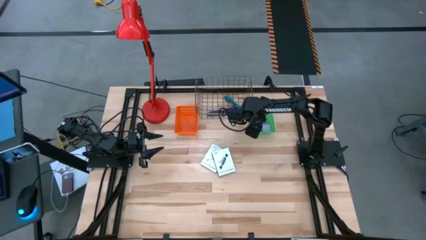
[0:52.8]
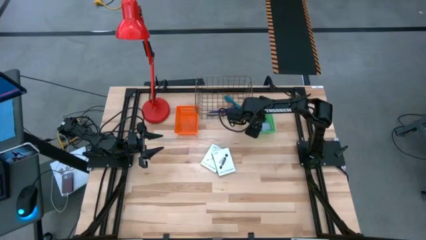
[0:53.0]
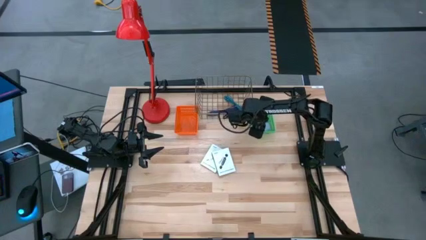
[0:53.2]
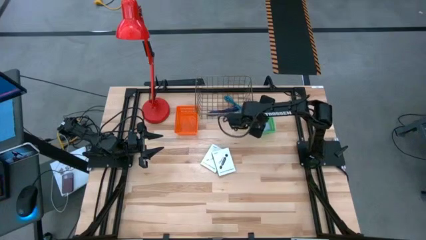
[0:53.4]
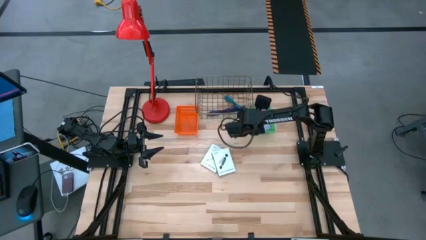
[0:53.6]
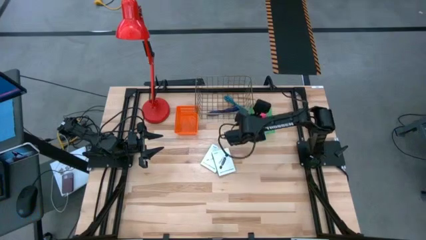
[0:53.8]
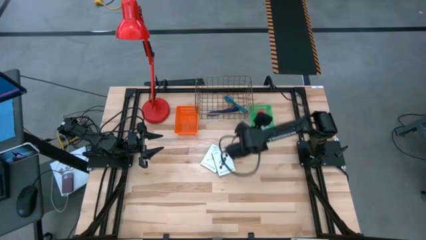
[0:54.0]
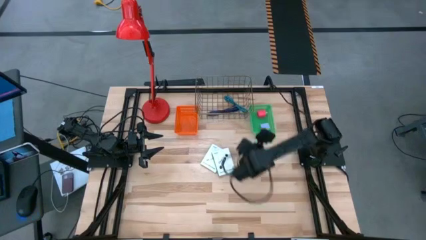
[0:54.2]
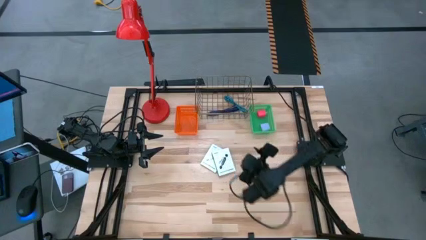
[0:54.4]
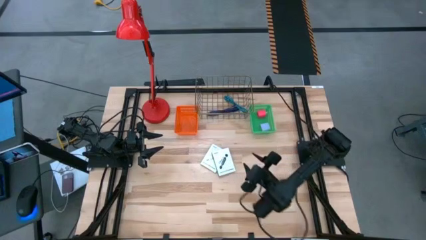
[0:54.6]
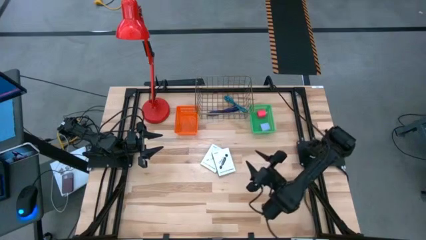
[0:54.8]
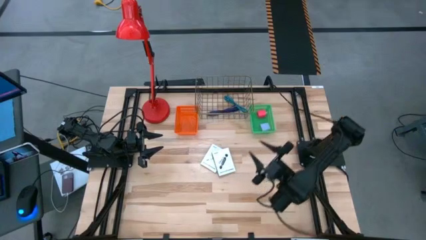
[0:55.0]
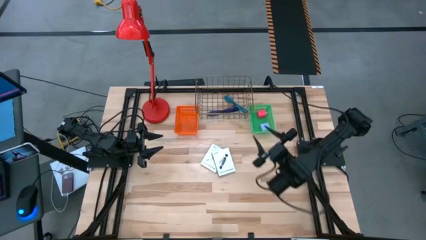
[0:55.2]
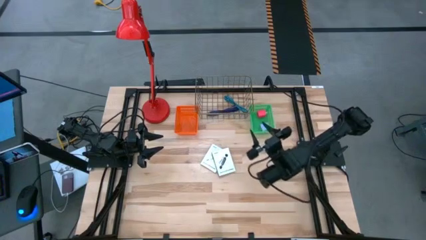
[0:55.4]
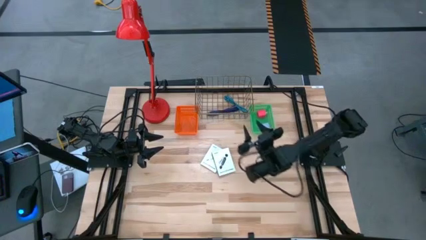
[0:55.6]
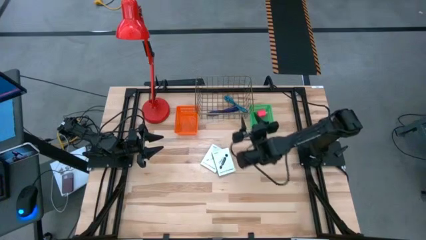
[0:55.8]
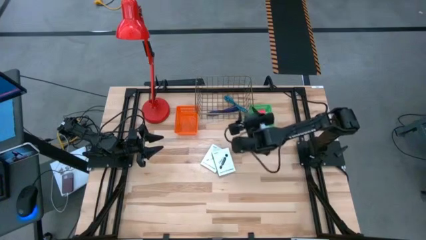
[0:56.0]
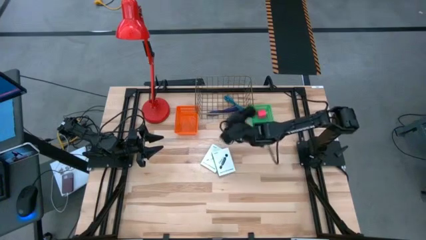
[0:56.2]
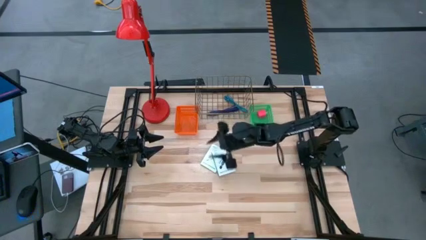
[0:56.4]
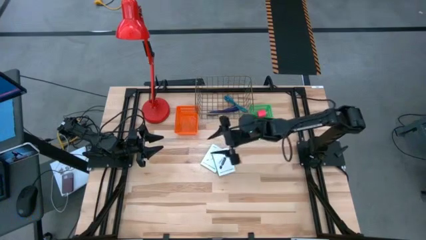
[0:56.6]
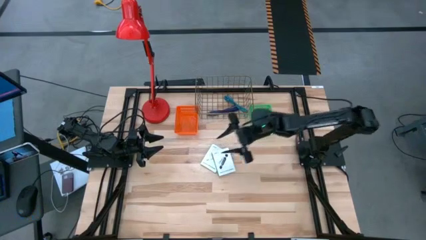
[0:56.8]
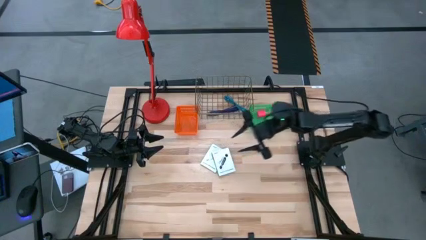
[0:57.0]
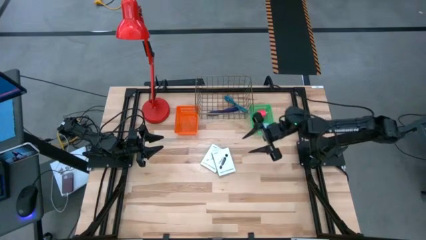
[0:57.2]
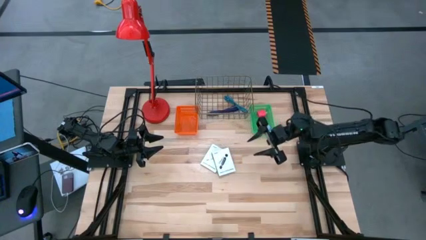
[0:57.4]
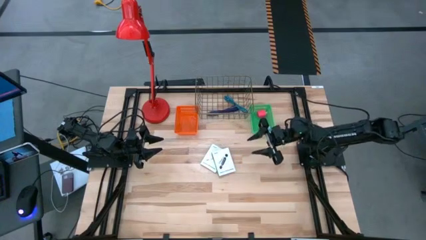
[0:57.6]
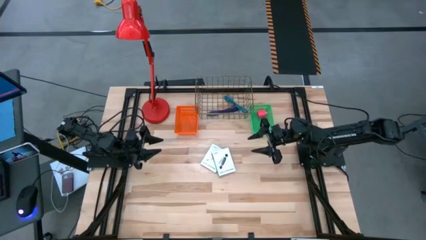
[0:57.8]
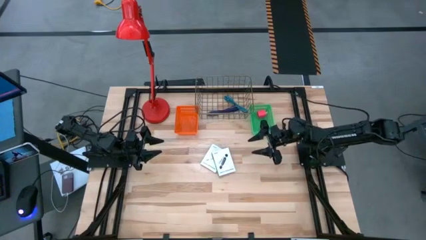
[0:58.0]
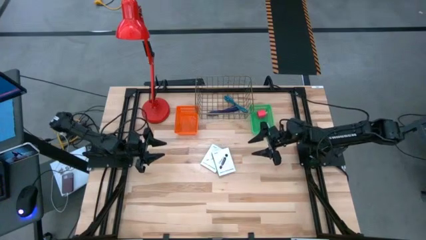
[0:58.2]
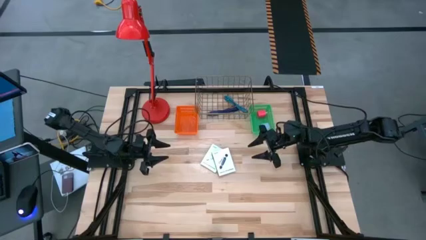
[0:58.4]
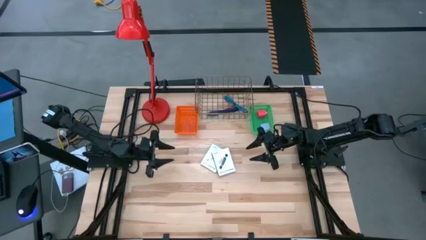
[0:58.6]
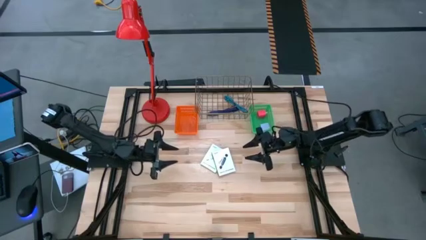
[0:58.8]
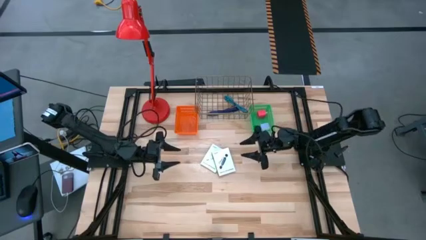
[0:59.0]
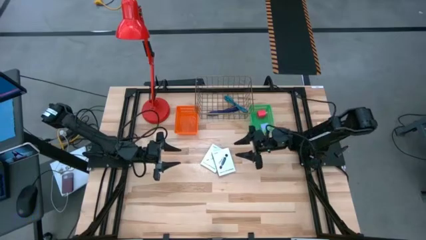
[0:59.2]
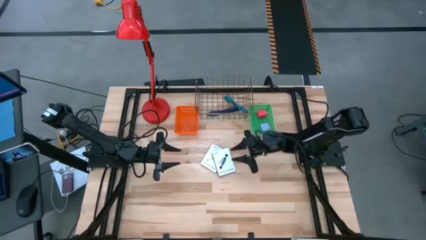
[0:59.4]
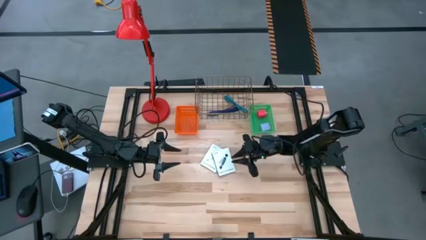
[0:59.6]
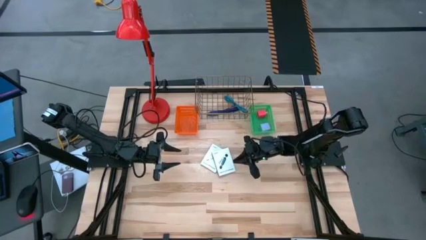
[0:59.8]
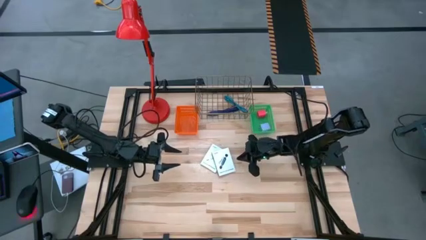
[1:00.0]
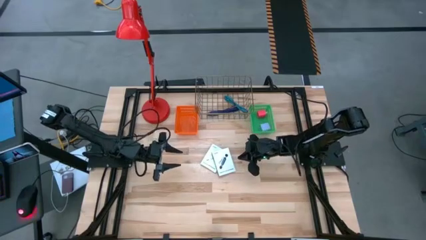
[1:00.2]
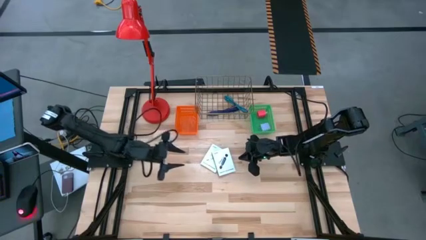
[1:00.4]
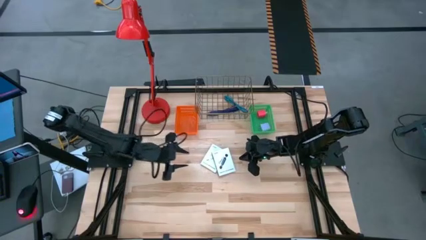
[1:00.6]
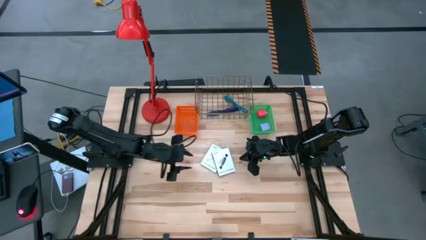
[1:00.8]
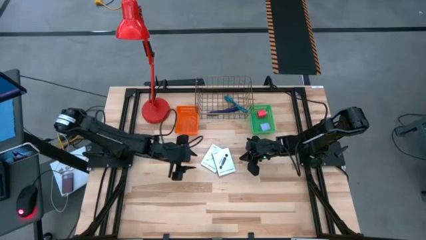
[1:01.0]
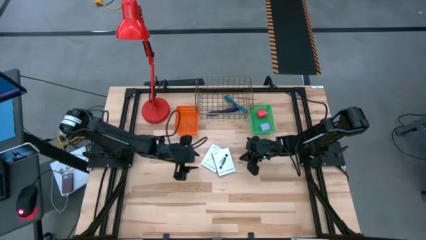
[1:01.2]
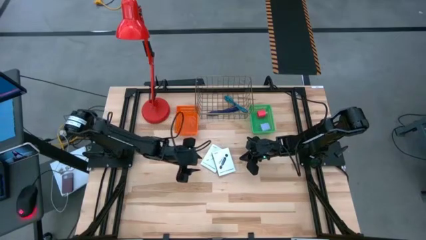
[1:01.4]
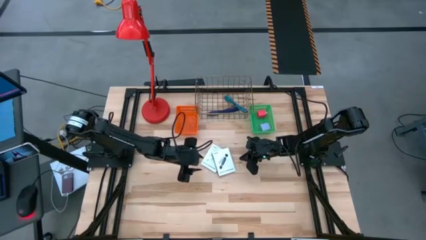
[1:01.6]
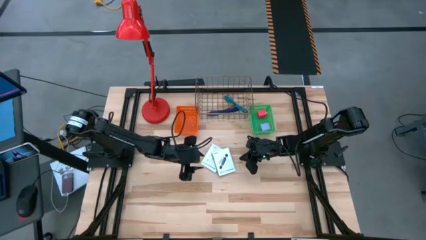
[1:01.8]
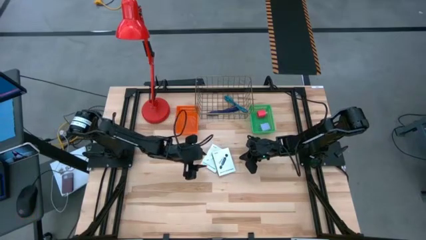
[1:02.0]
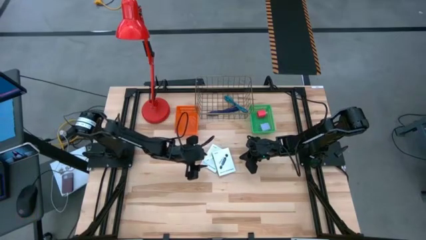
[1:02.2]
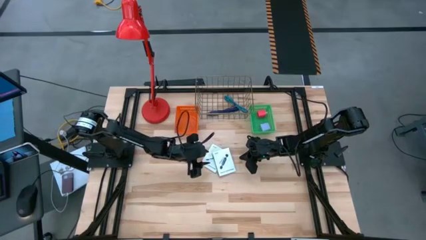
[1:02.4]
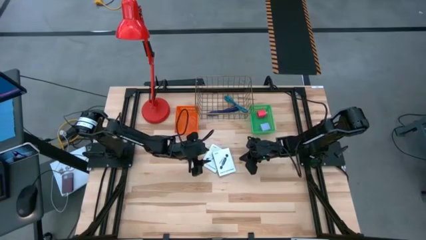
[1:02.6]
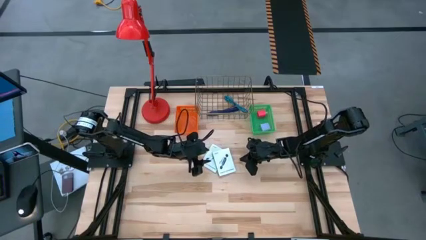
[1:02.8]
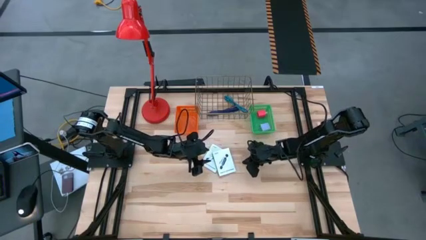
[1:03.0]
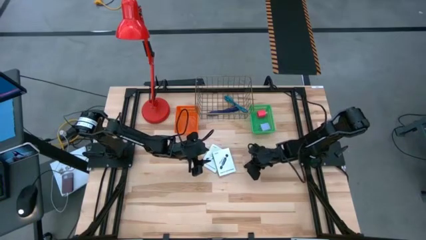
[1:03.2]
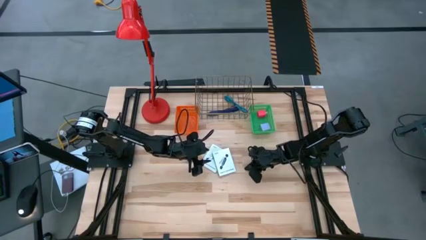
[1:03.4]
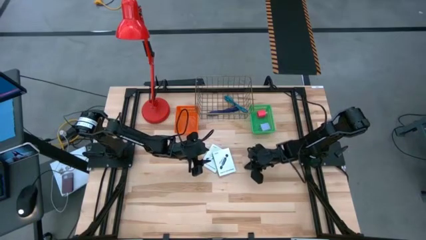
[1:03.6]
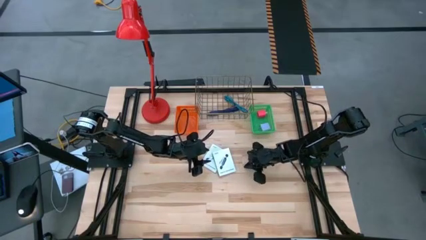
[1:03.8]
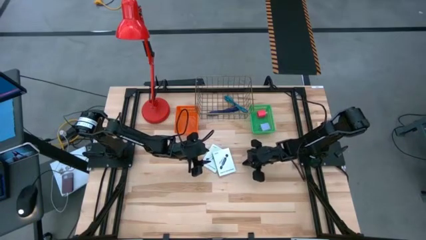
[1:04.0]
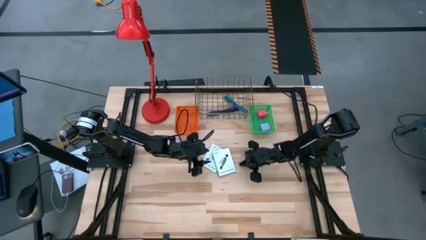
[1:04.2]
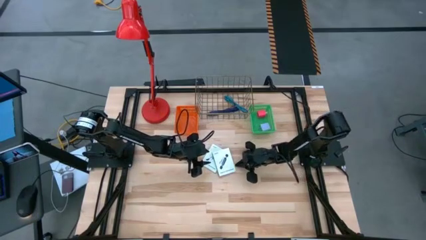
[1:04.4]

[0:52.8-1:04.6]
Task: Pick and place items into bin
Put the card reader box into the orange bin
